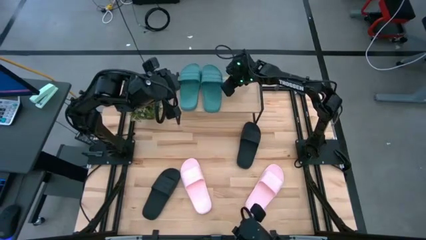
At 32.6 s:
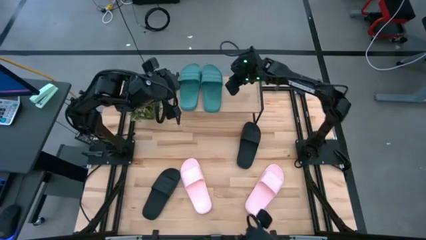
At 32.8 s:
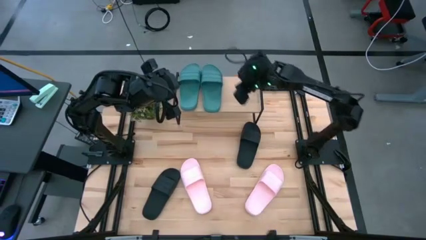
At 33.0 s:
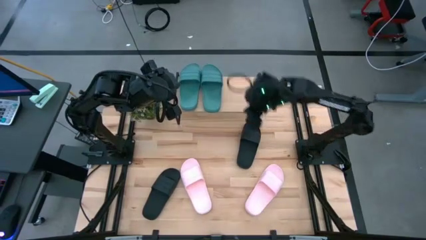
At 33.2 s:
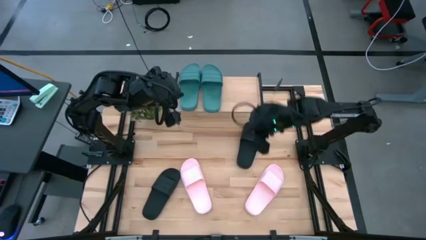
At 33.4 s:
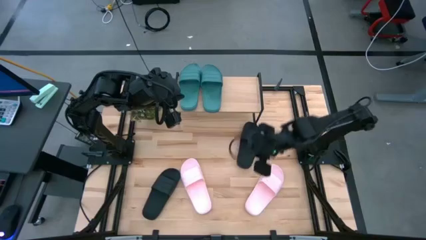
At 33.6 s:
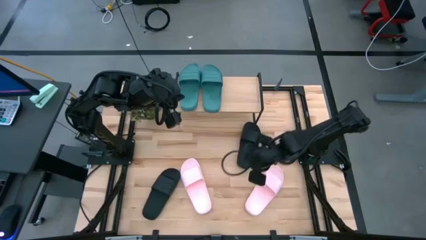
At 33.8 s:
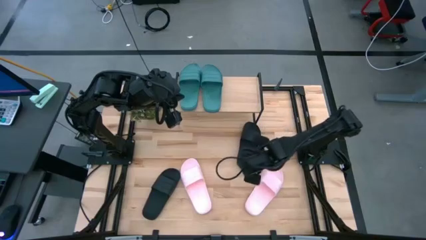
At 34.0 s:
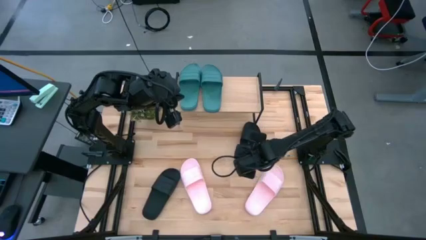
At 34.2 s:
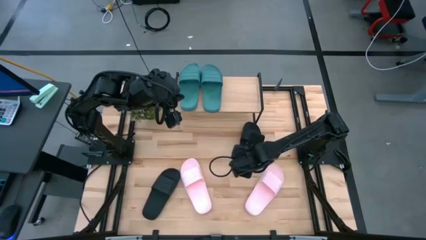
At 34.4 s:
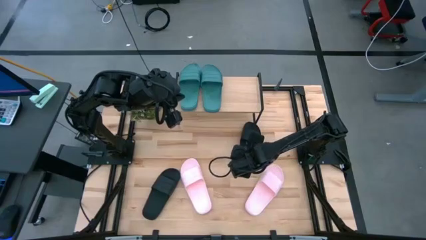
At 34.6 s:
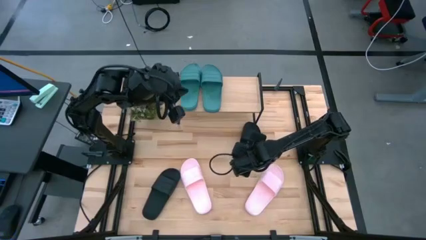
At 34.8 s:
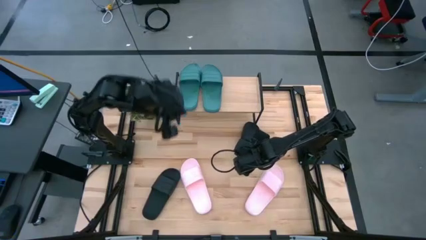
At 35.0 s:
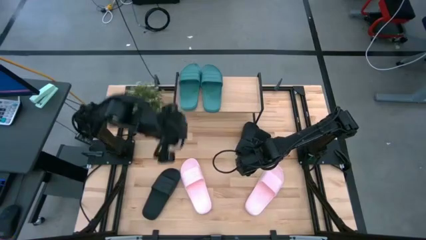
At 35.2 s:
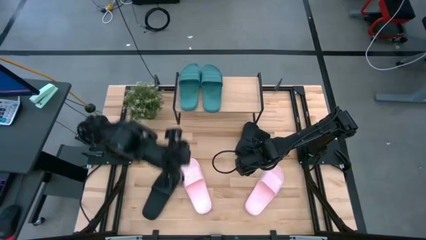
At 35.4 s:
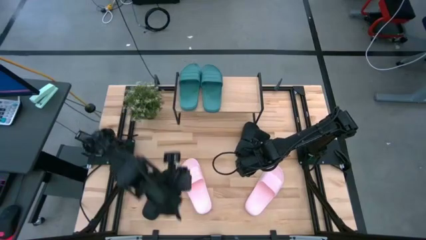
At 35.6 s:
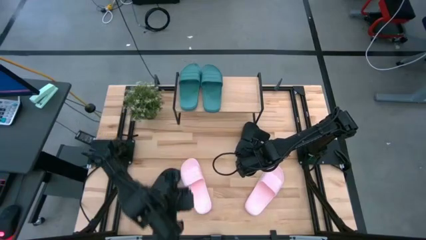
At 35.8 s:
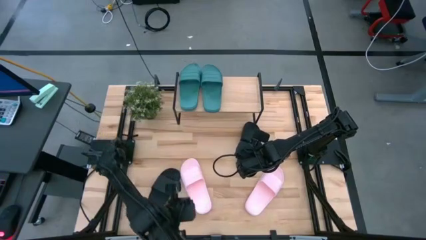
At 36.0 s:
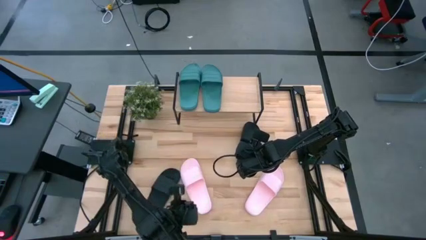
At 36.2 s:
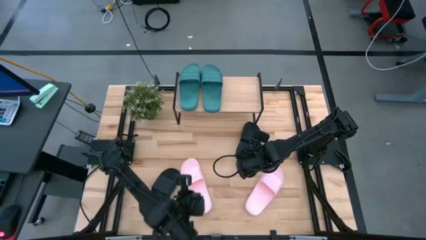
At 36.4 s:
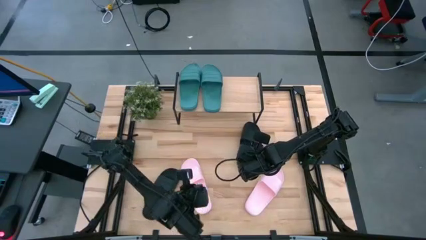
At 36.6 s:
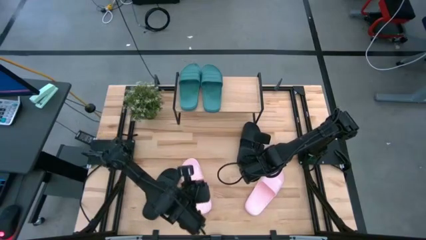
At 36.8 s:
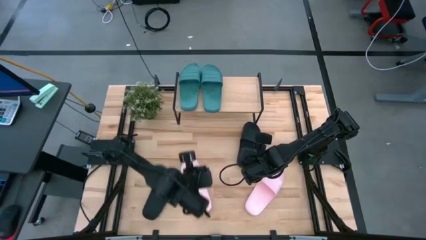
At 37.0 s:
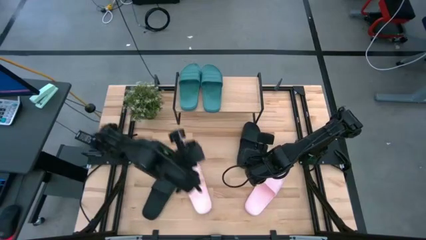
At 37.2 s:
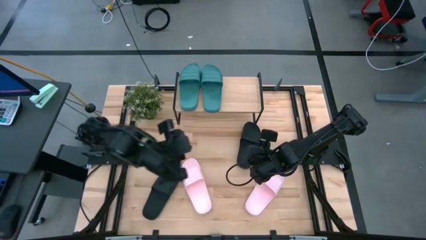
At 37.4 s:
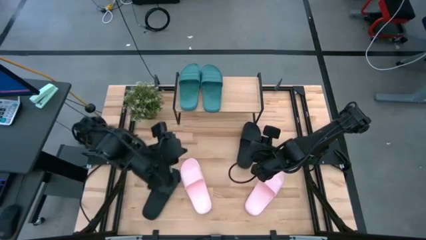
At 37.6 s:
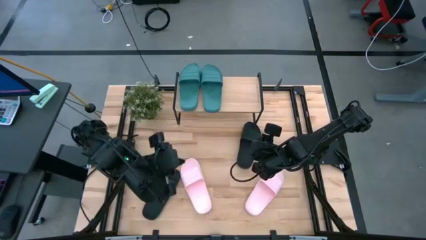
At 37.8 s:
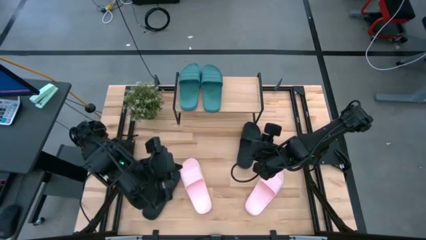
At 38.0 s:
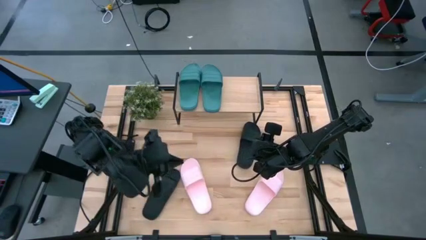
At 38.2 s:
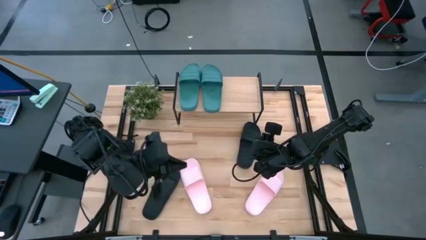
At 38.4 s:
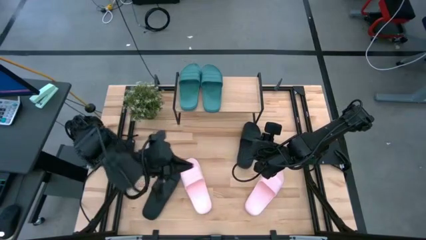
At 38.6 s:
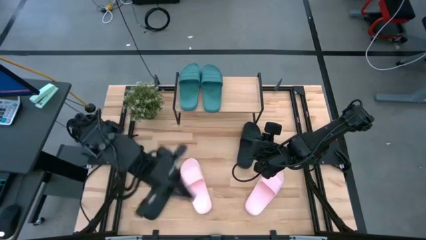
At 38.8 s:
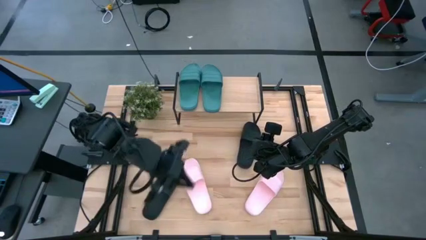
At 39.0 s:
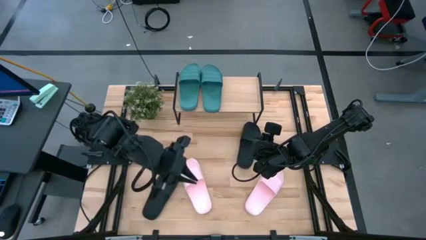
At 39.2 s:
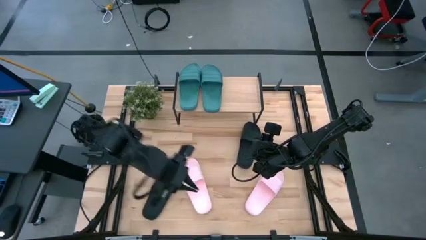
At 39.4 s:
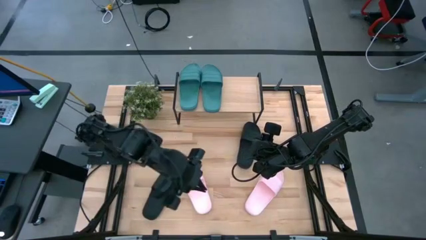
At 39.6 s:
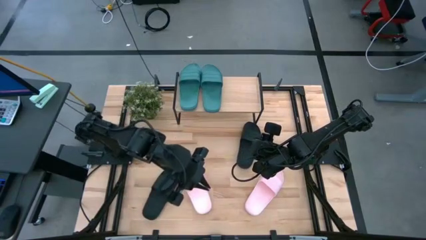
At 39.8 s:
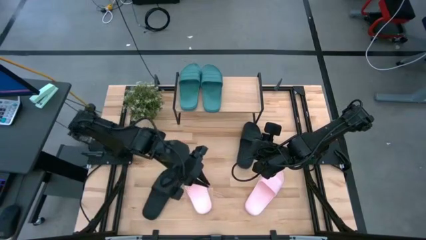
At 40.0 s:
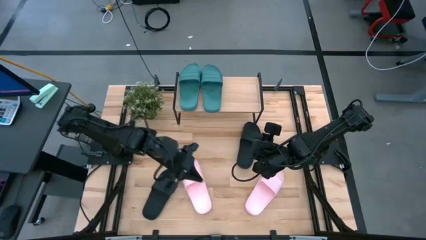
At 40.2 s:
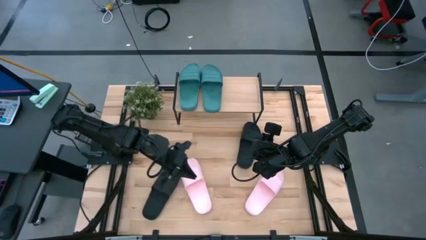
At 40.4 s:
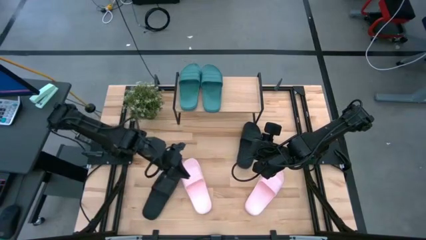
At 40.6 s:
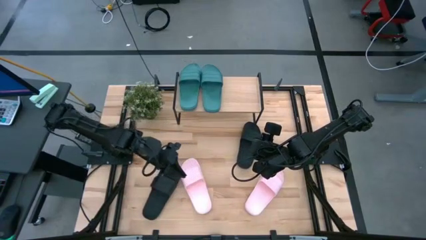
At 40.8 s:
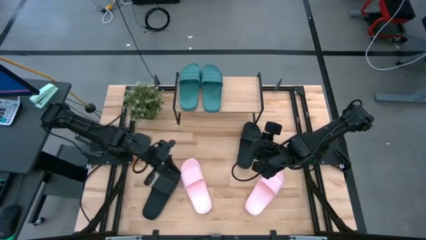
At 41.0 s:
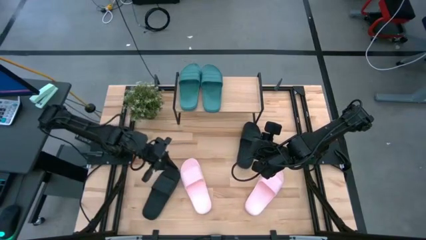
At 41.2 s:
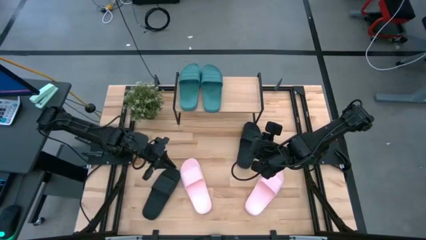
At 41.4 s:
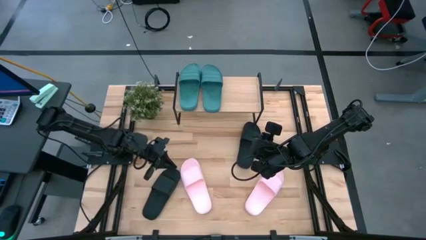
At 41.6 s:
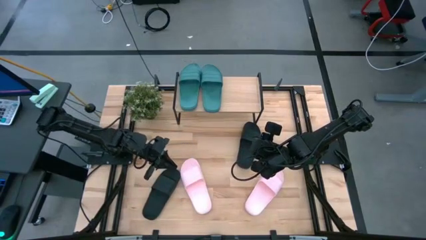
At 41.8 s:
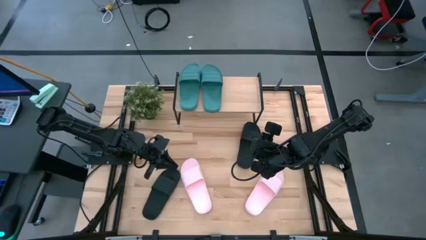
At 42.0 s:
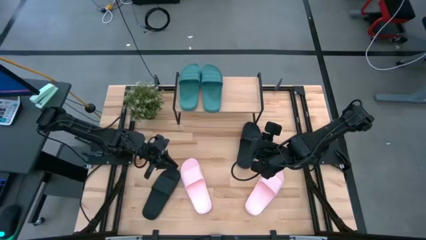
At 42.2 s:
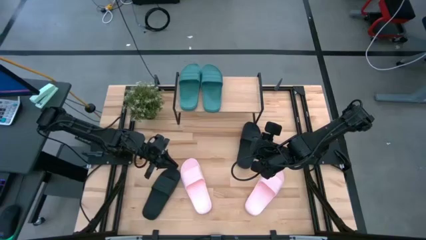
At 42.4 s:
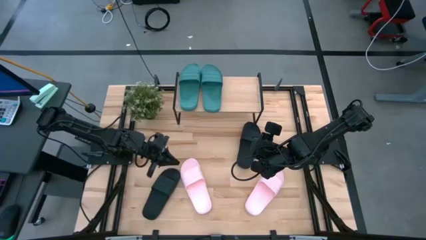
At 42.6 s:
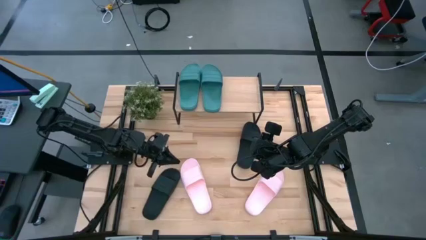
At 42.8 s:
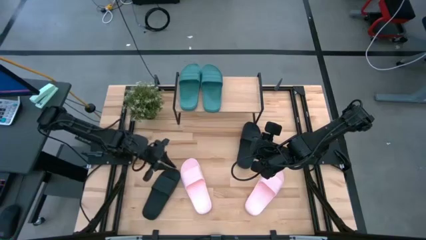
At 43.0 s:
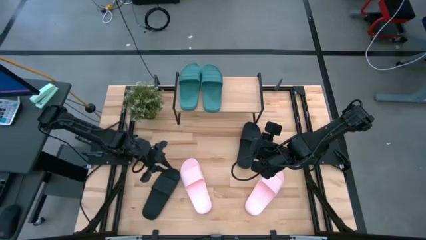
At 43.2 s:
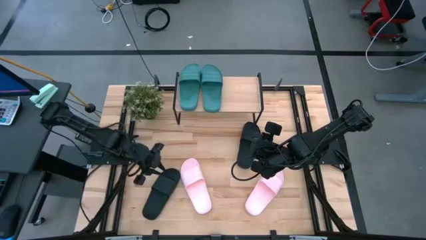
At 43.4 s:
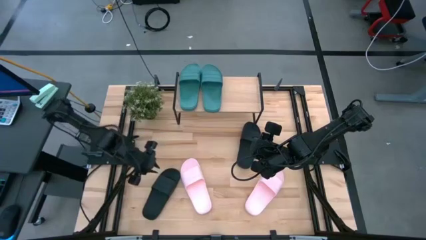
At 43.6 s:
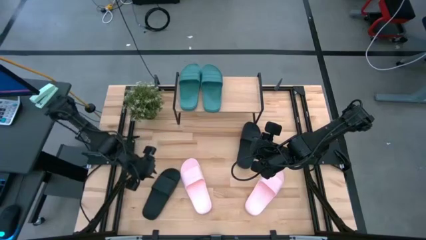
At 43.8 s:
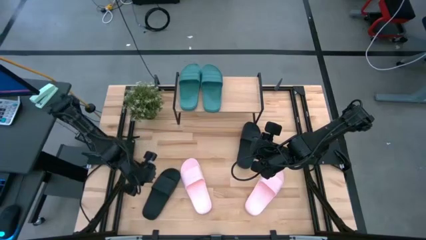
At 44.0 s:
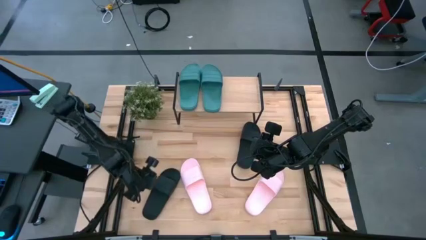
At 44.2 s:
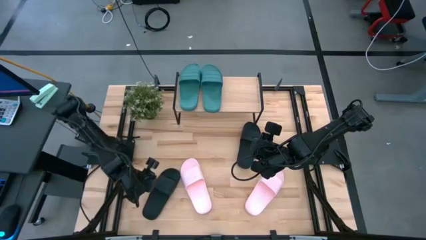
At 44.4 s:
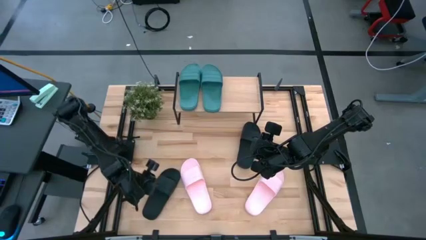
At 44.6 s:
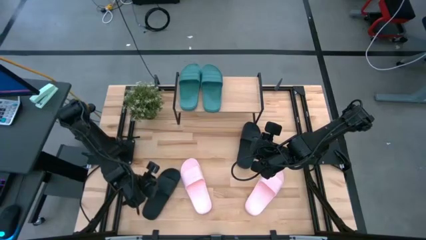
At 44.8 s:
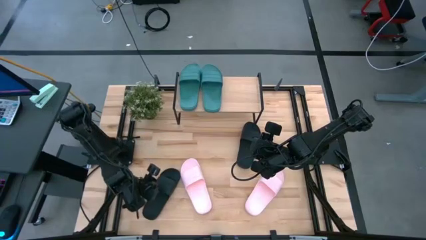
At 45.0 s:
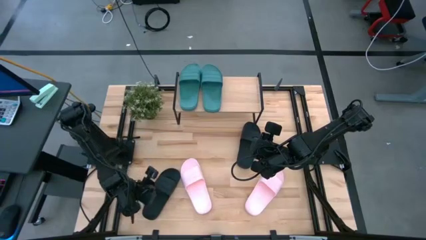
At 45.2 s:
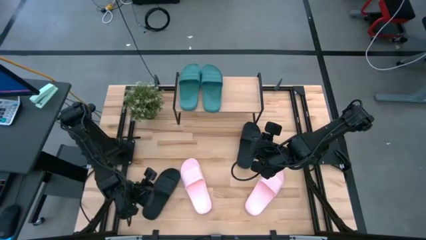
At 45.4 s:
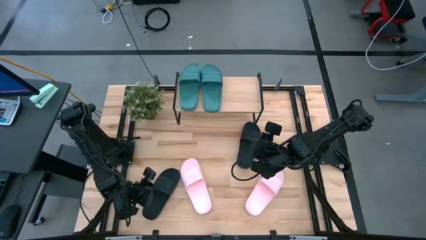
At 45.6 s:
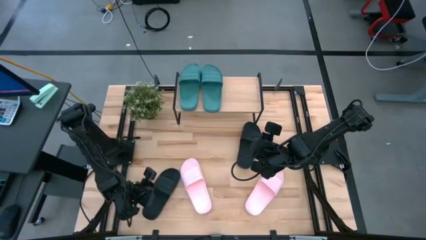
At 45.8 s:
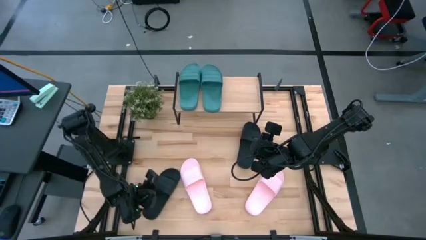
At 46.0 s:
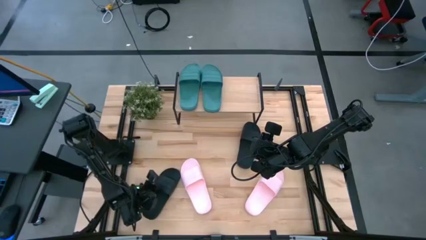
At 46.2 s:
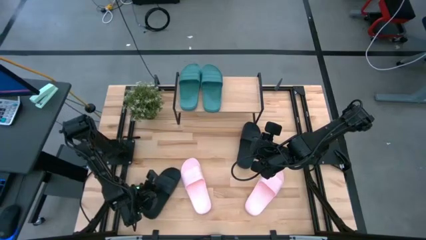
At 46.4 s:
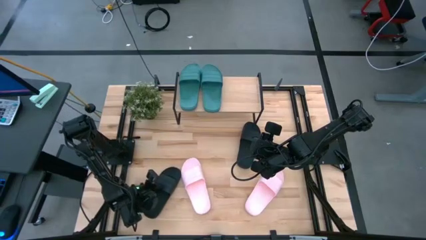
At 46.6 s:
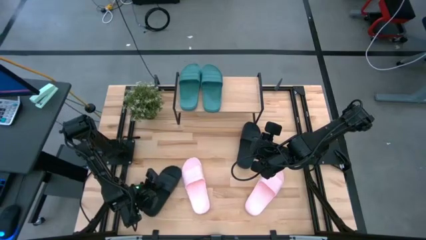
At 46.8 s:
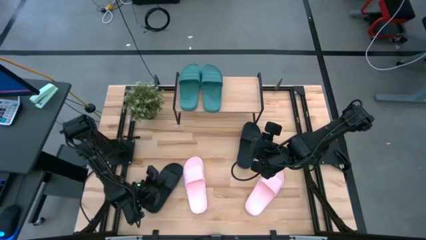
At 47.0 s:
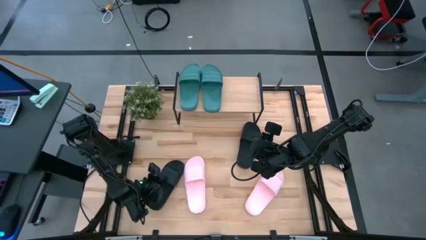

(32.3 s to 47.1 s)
Task: Pick and place slides into the shelf
Put the bottom black slide on the shelf

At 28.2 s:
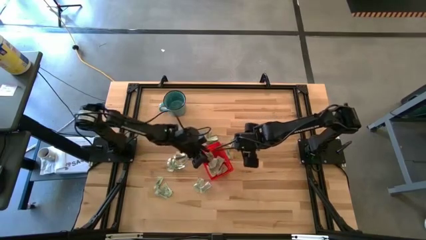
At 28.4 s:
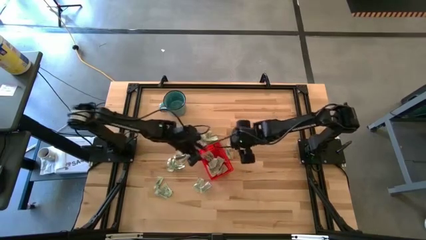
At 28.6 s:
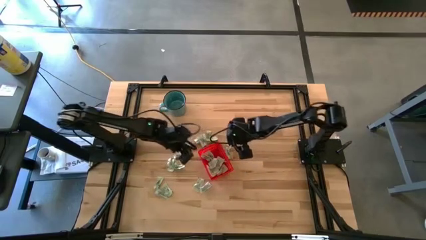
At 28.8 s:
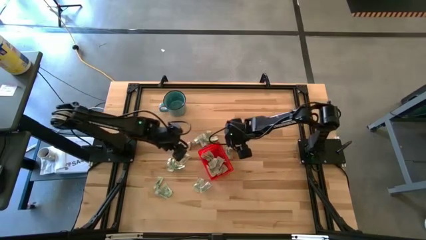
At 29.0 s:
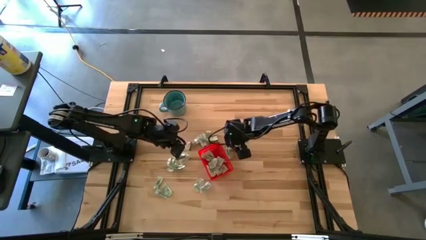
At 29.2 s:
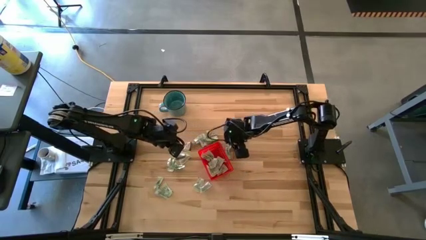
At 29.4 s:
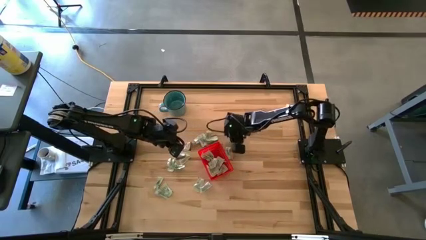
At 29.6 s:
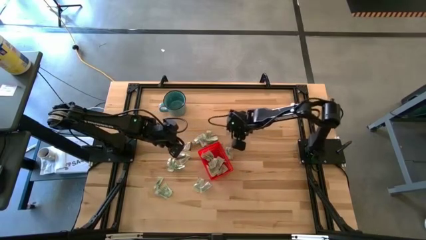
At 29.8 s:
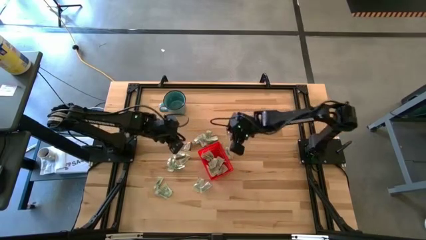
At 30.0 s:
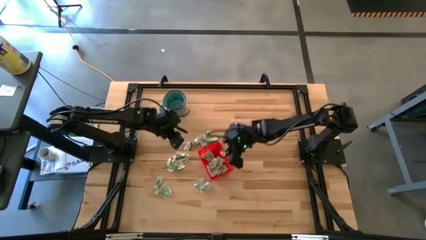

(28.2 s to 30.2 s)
Task: Pick and place Stevia / Truvia into bins
Put the white stevia packet into the basket
